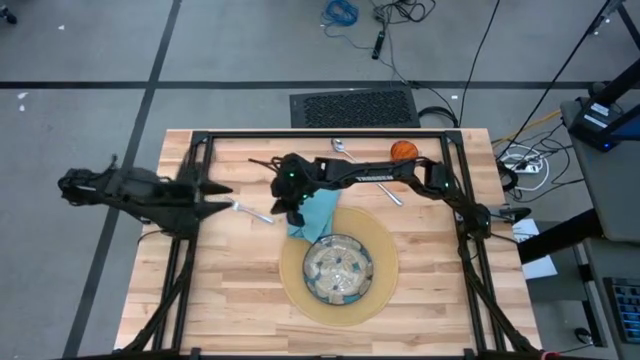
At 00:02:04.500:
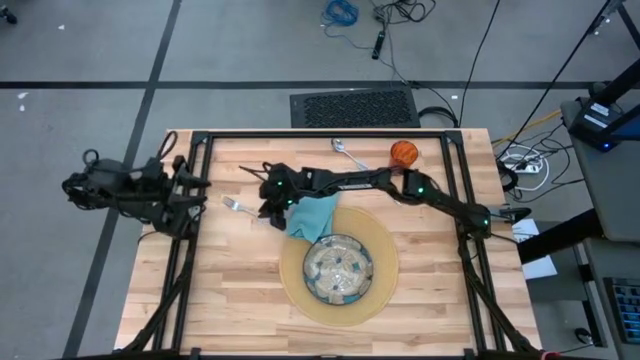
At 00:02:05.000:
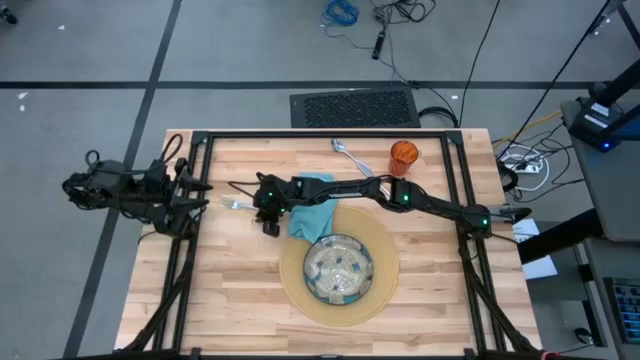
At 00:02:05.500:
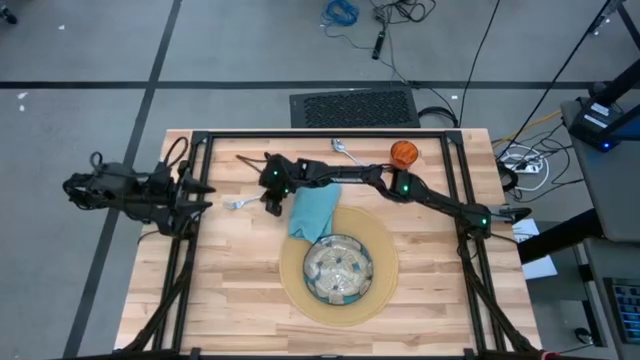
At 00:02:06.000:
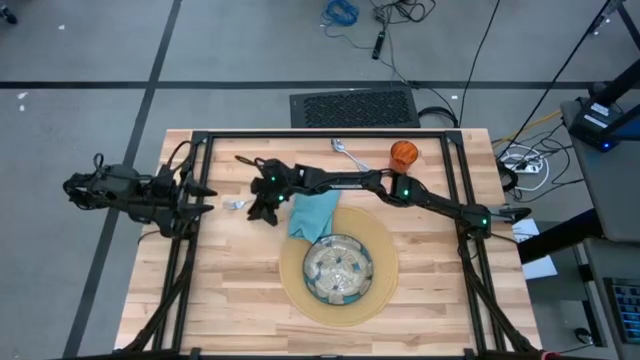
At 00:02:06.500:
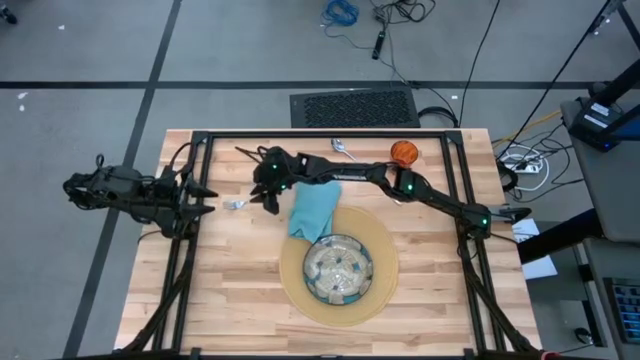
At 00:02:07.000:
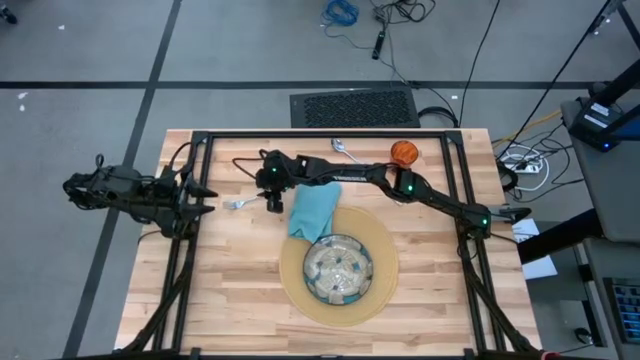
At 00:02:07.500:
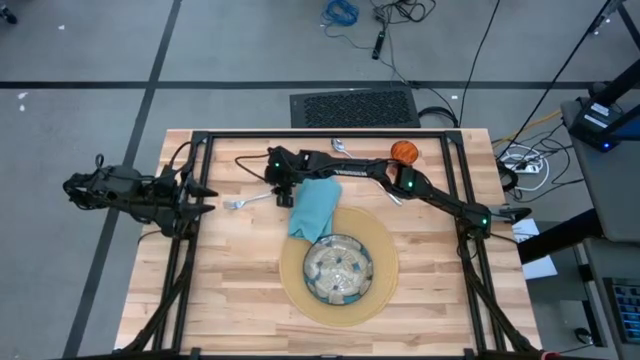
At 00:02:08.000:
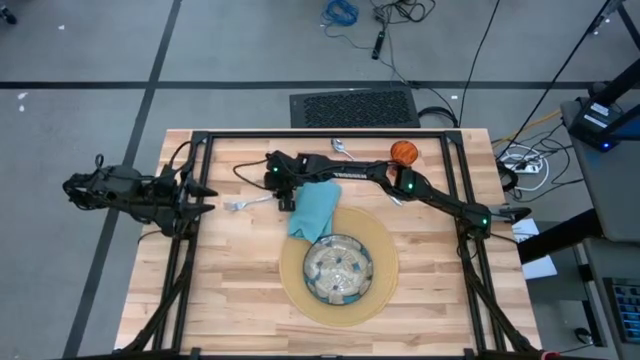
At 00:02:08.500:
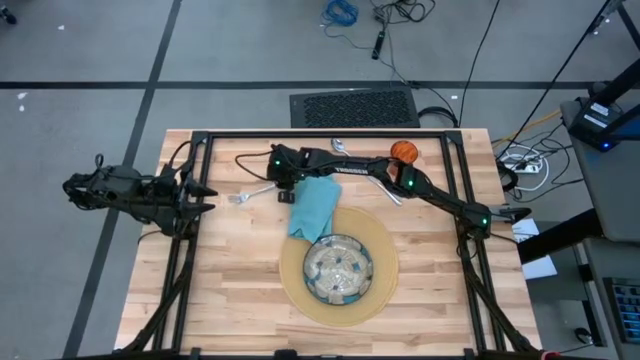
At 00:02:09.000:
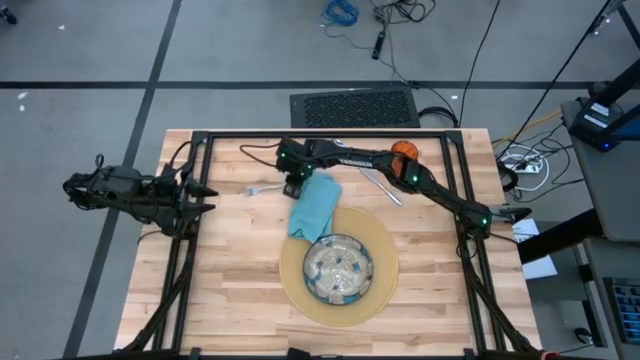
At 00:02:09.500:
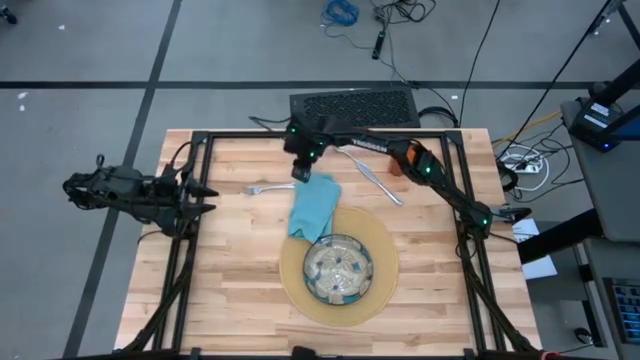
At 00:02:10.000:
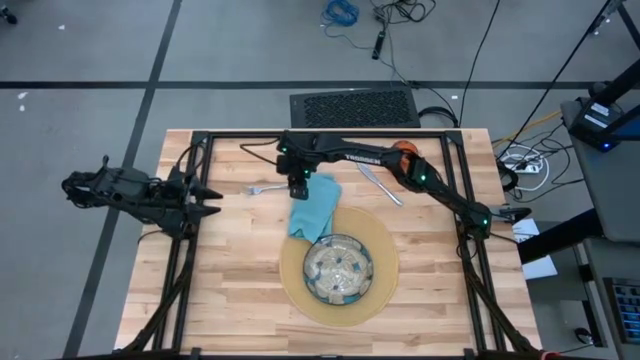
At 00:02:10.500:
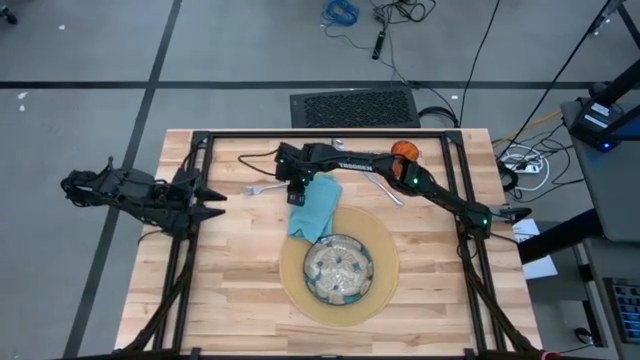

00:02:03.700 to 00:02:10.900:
Task: Set table place
Move the silver fork to the top center of the table

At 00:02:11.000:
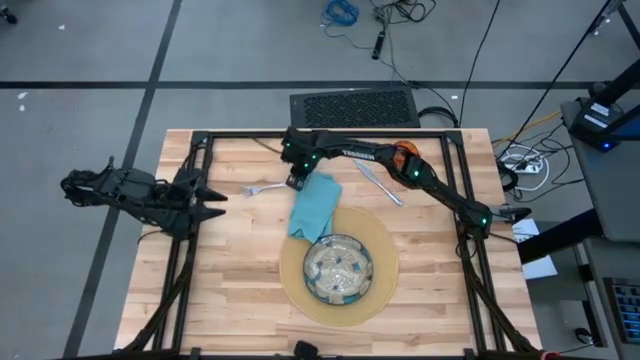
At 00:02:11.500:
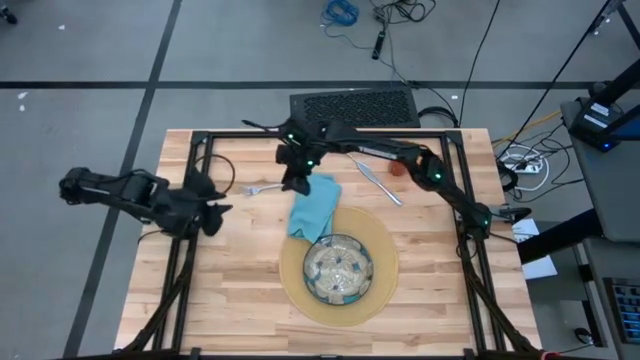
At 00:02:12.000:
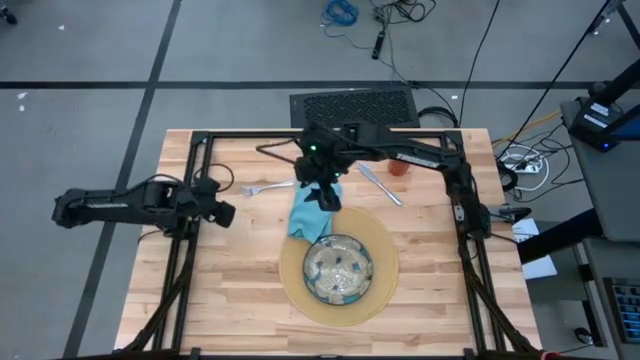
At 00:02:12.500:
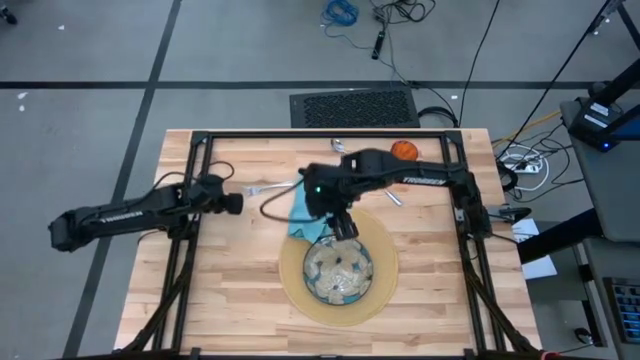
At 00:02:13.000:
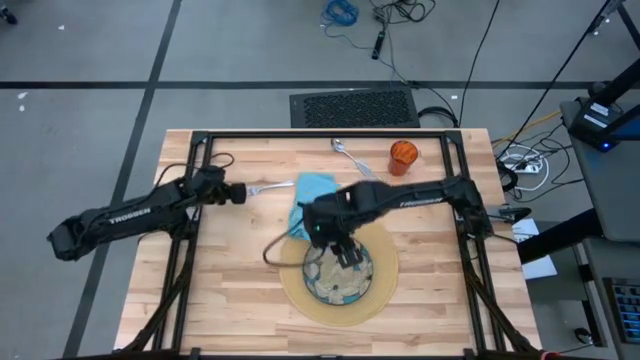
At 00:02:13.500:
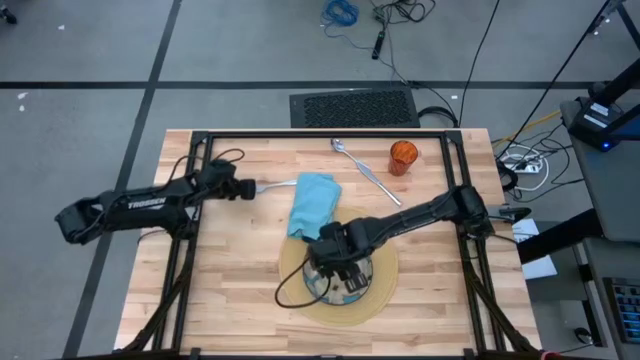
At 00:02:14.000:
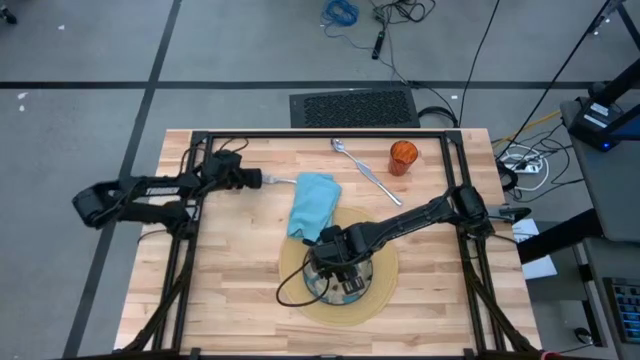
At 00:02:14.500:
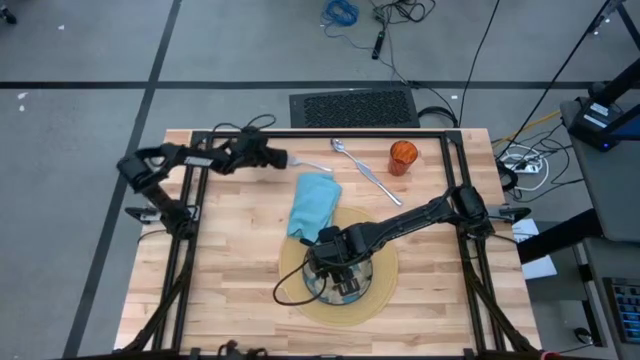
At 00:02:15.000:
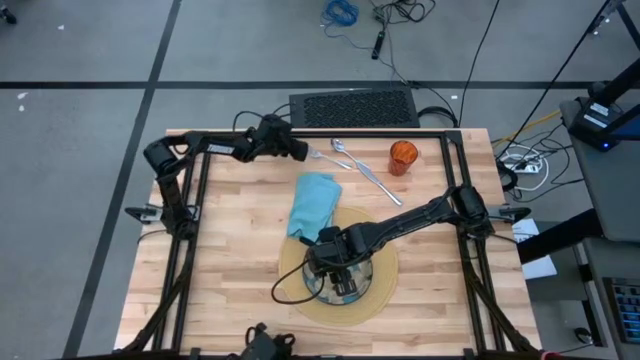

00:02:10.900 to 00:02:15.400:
Move the silver fork to the top center of the table

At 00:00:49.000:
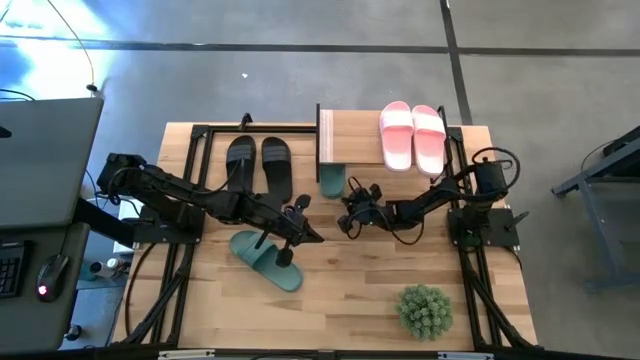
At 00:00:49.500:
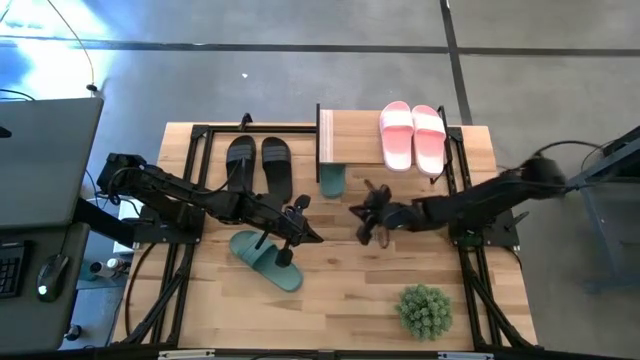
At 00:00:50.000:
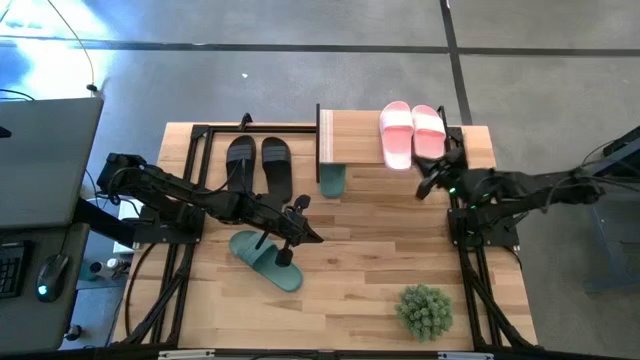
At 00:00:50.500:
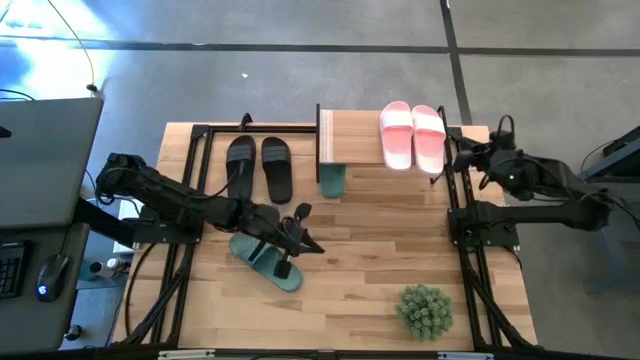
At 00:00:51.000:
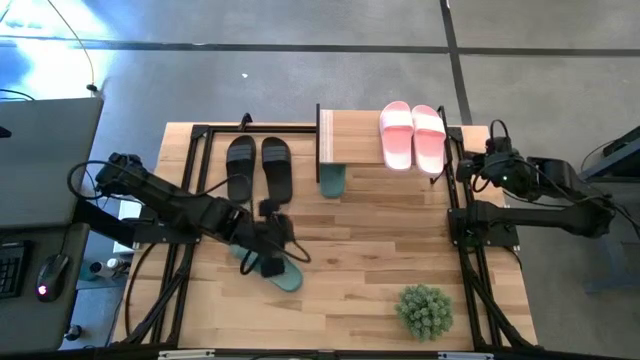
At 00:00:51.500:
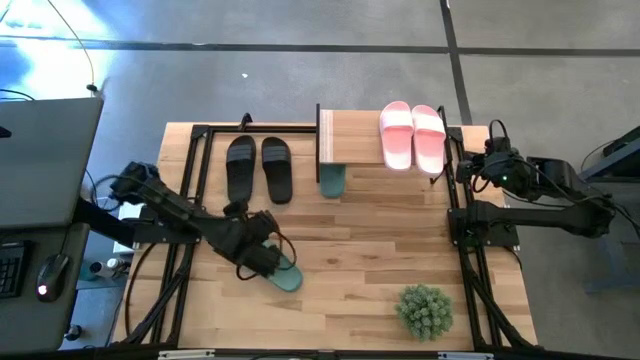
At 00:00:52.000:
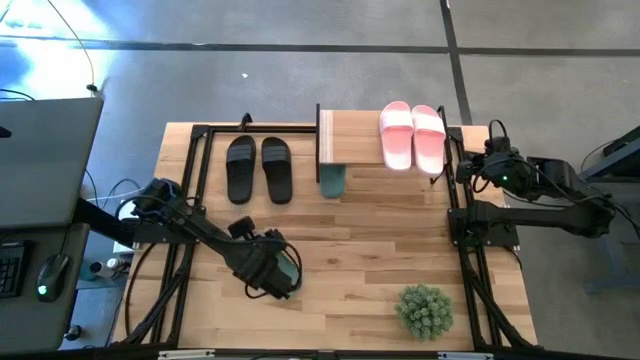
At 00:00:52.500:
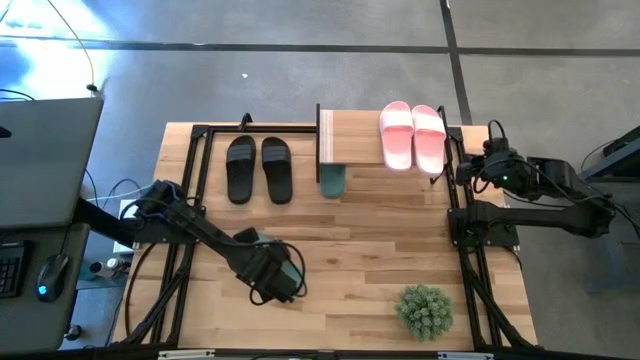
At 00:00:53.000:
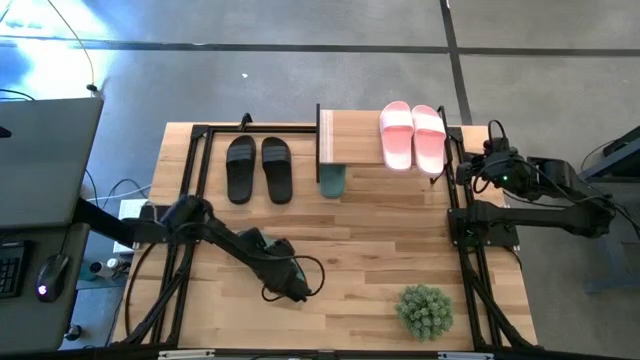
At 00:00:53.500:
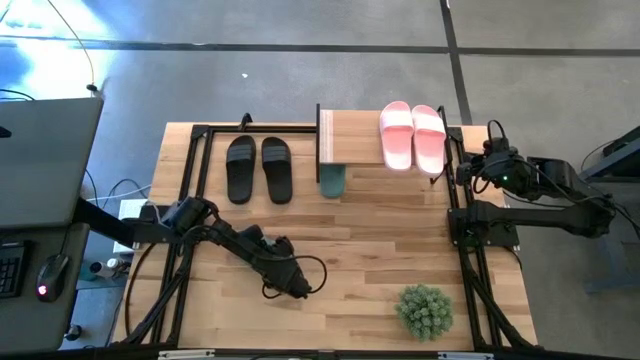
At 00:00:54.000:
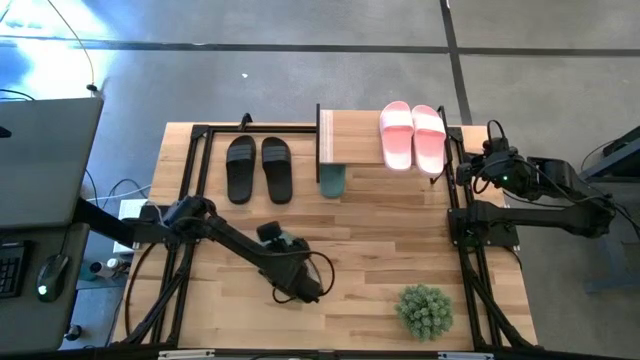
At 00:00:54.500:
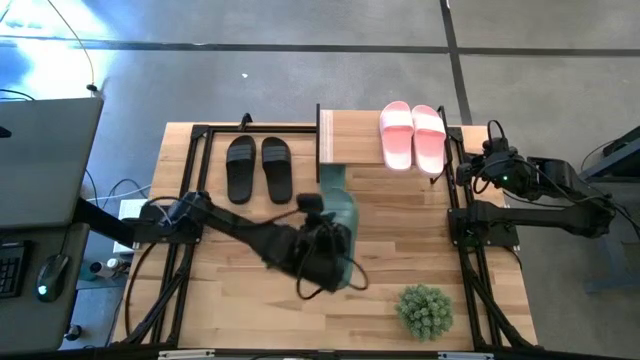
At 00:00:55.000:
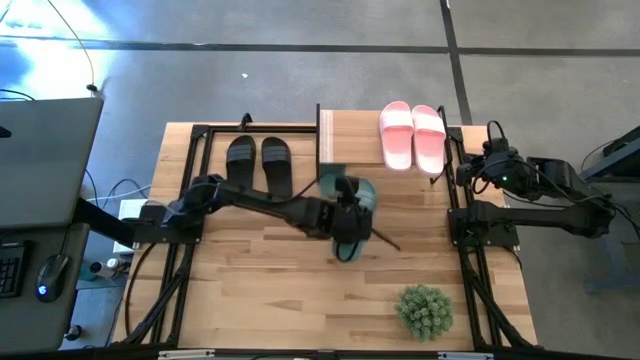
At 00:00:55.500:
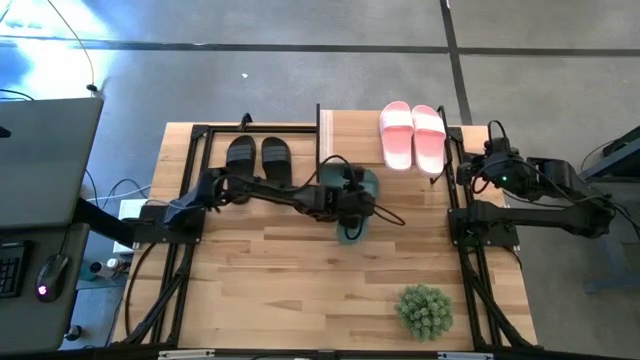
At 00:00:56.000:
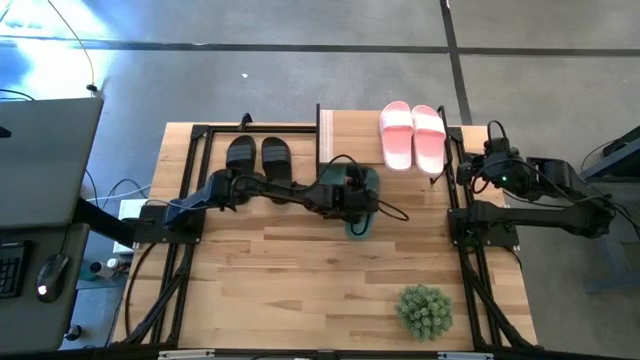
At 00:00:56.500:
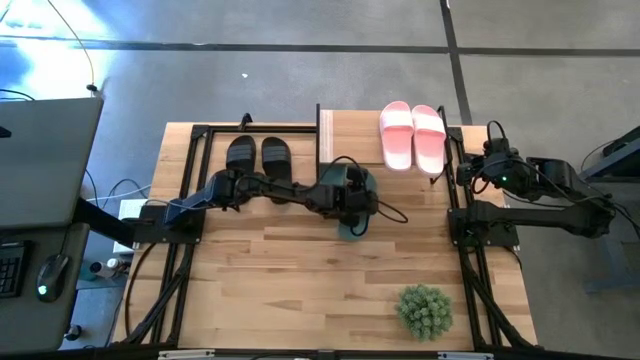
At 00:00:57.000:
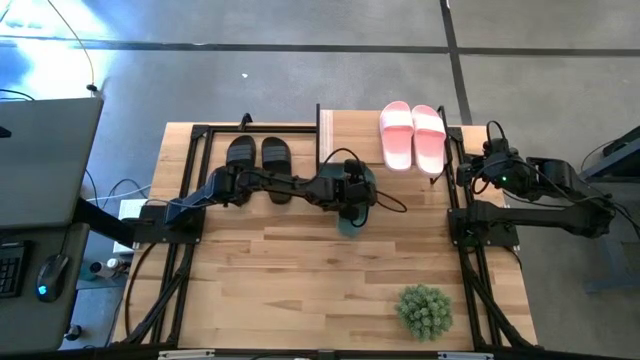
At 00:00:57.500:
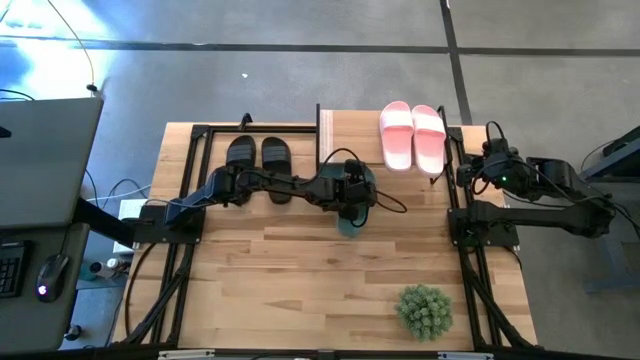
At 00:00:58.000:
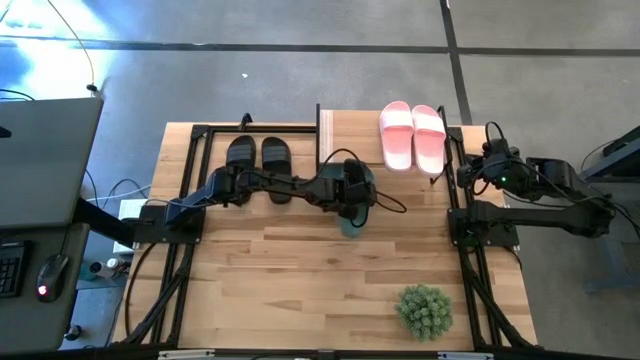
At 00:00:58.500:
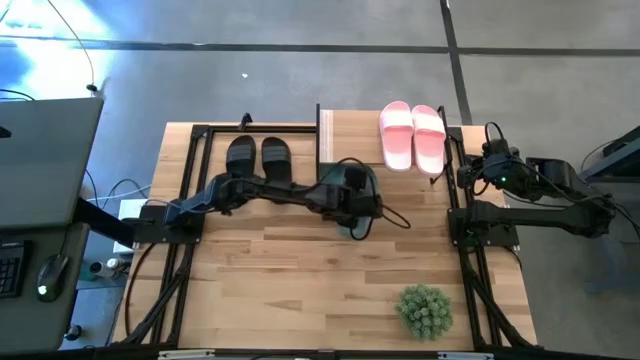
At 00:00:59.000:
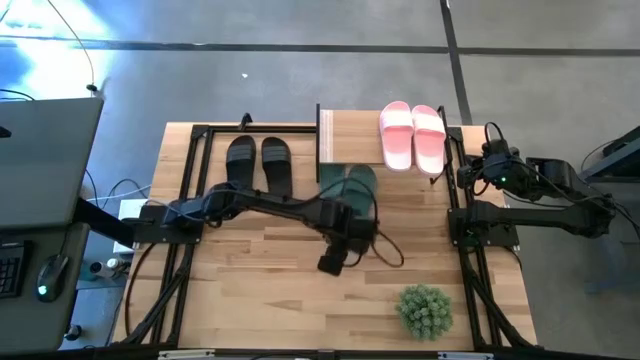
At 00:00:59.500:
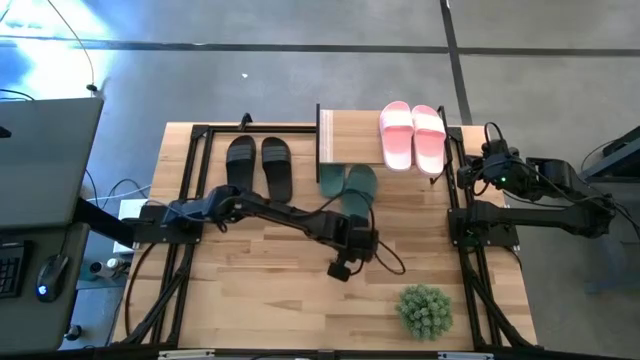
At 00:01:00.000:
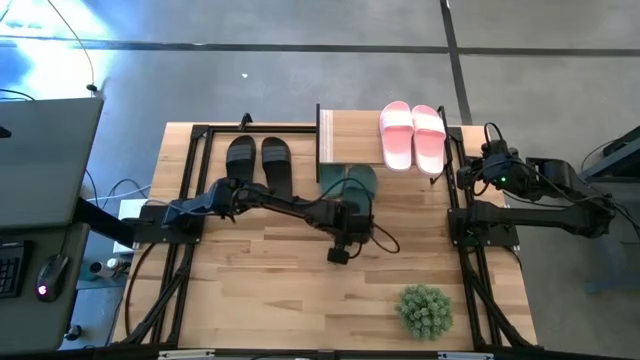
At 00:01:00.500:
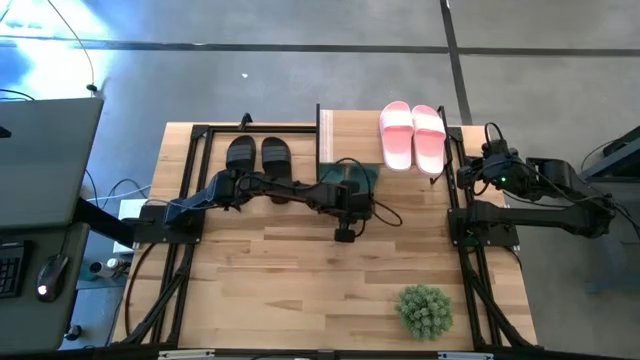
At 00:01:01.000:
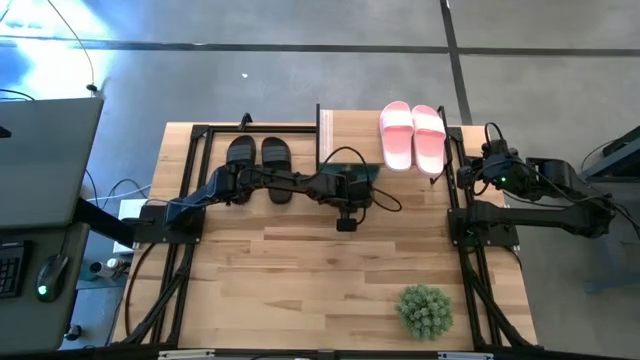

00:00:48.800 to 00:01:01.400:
Task: Pick and place slides into the shelf
Put the green slipper under the shelf
